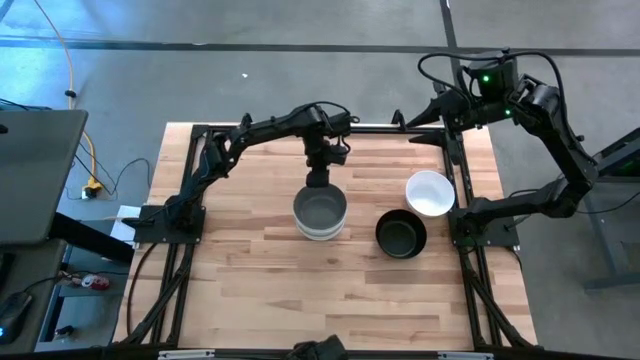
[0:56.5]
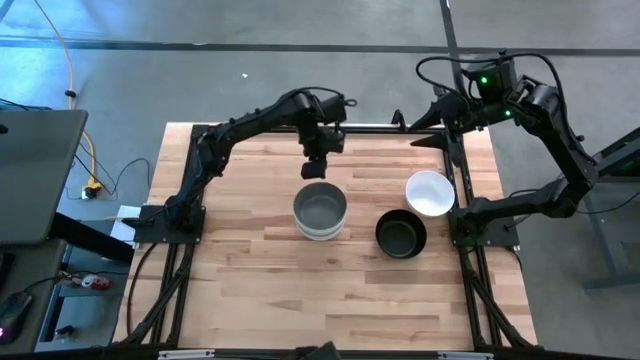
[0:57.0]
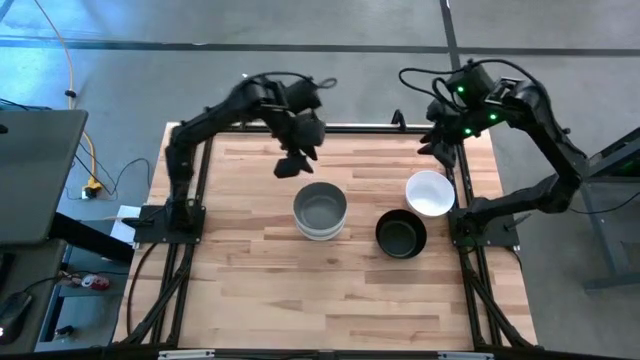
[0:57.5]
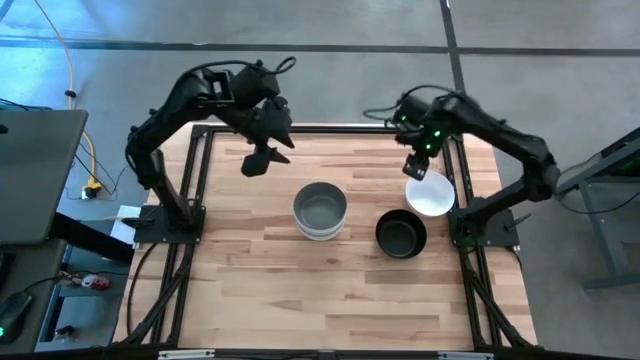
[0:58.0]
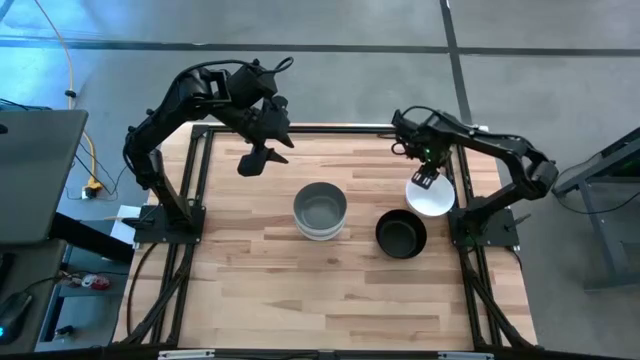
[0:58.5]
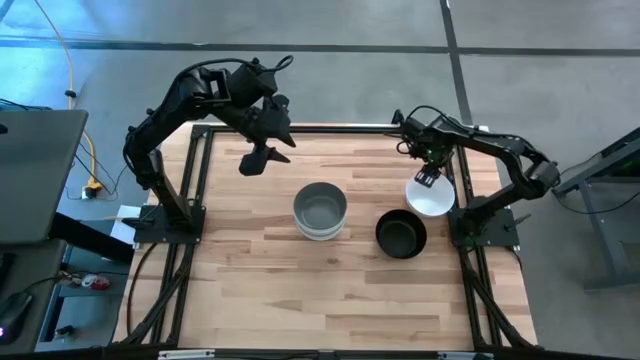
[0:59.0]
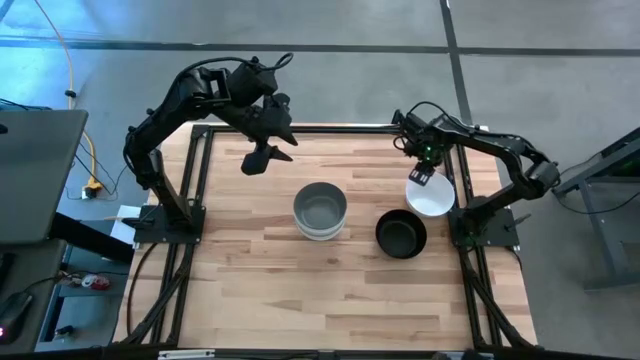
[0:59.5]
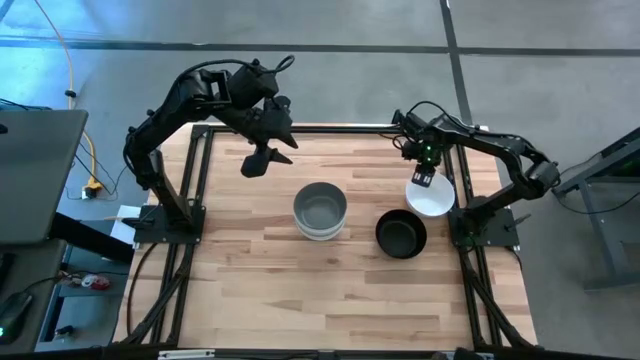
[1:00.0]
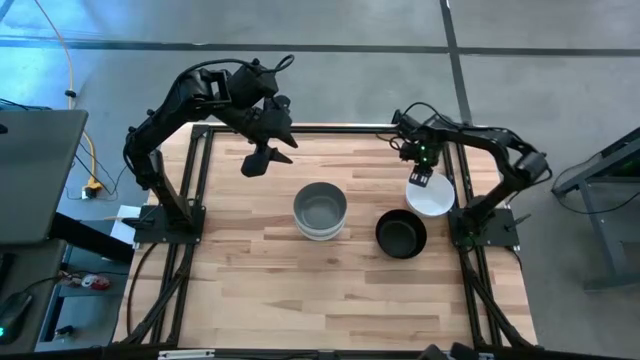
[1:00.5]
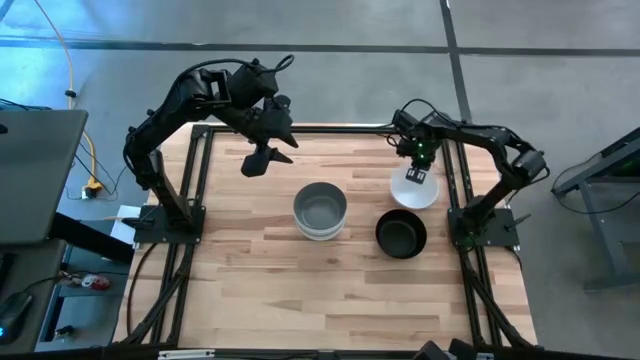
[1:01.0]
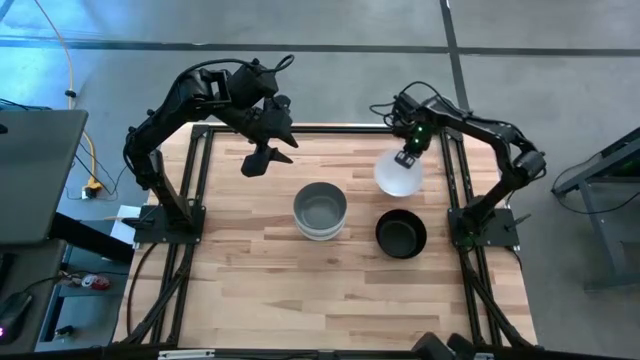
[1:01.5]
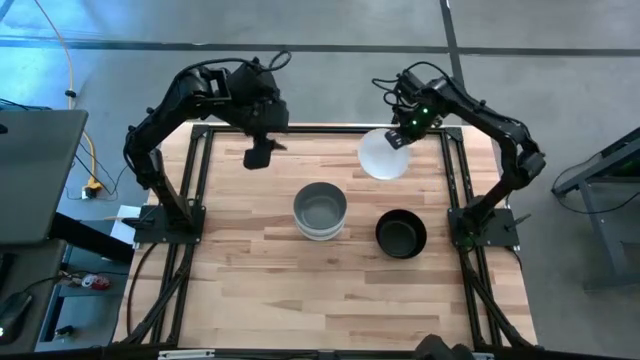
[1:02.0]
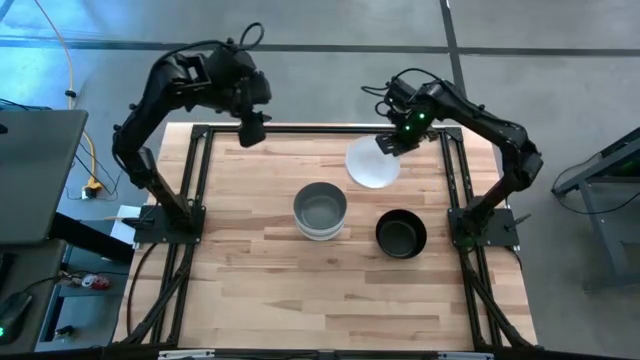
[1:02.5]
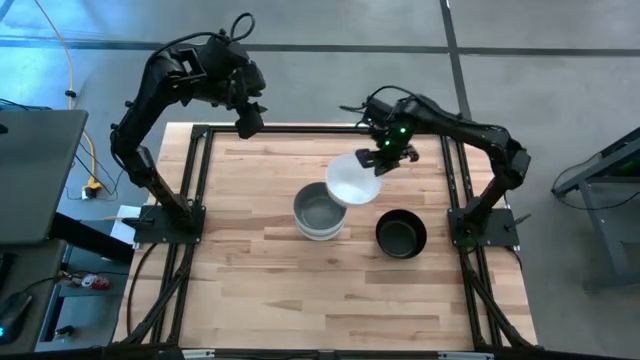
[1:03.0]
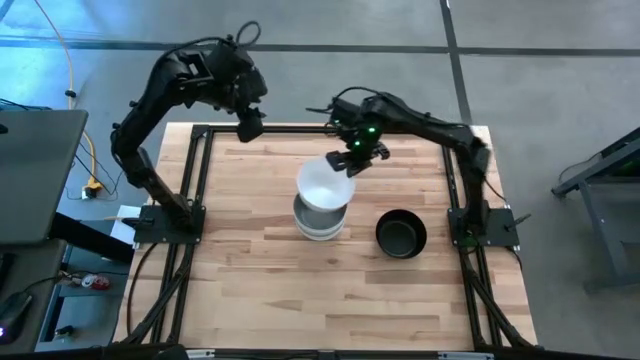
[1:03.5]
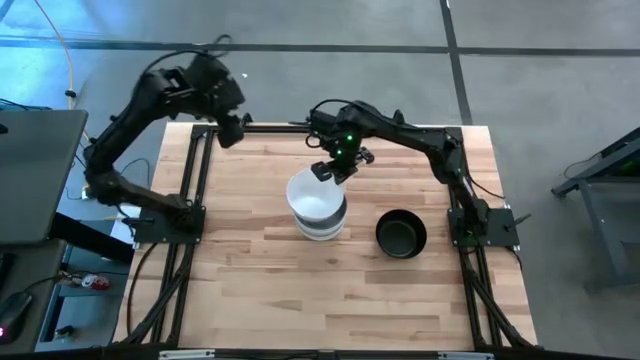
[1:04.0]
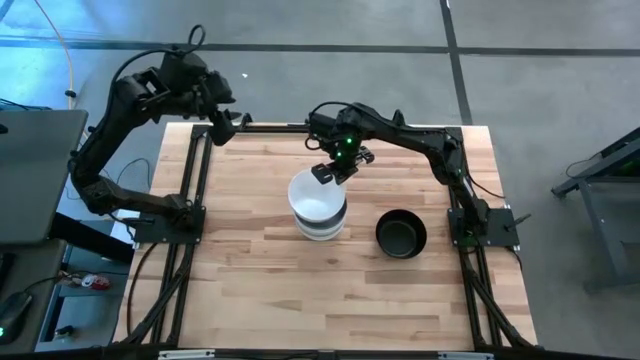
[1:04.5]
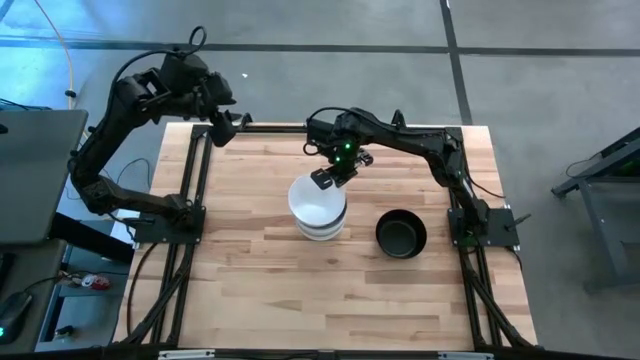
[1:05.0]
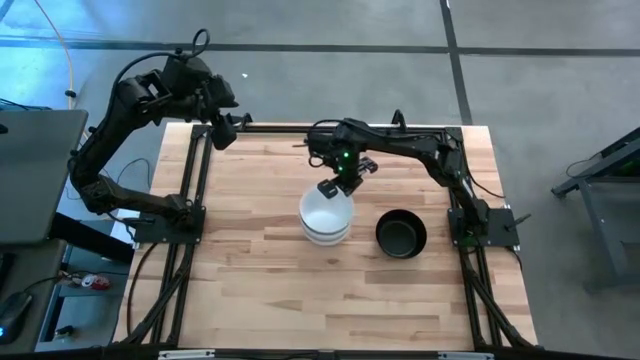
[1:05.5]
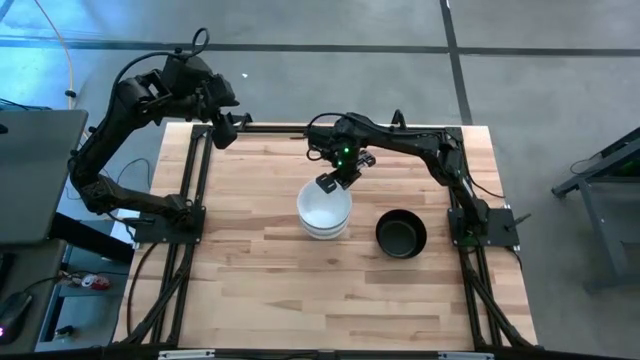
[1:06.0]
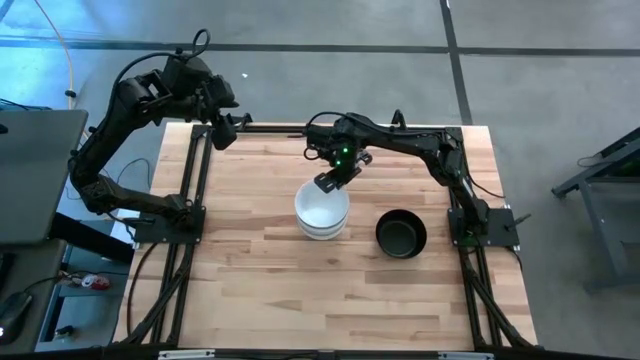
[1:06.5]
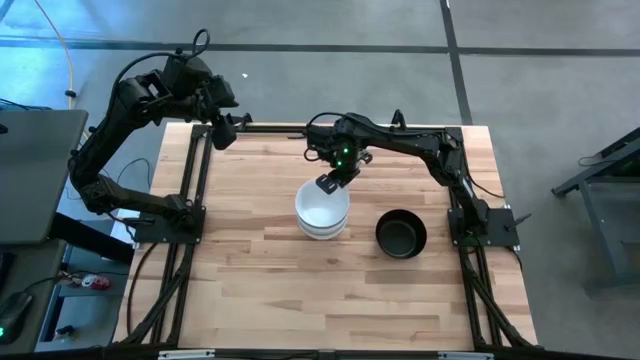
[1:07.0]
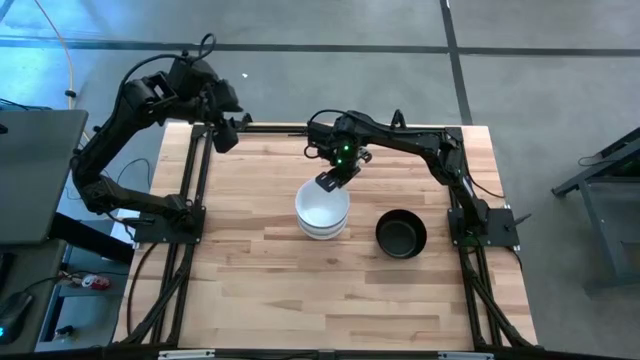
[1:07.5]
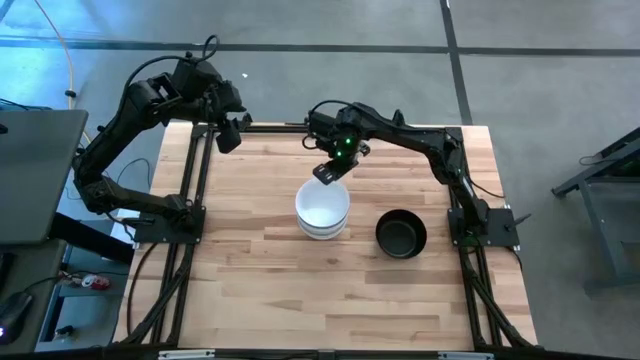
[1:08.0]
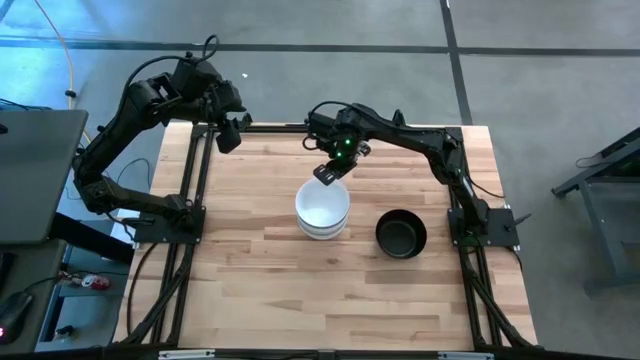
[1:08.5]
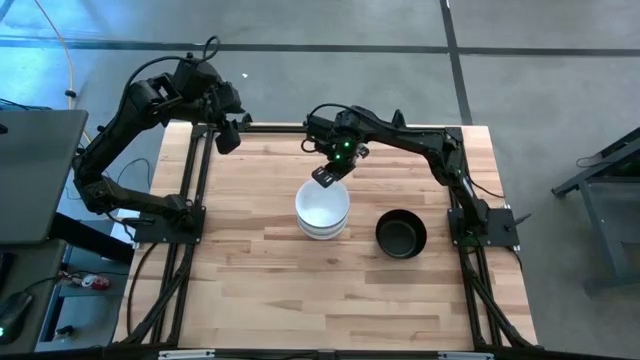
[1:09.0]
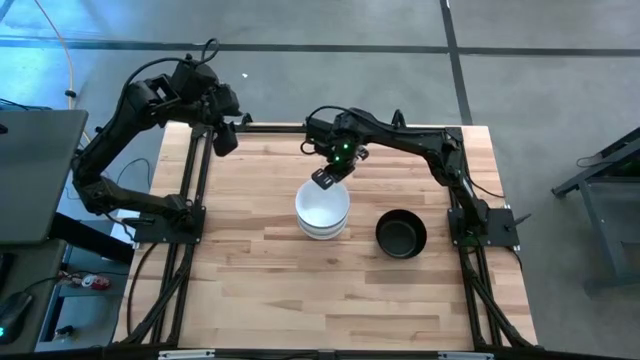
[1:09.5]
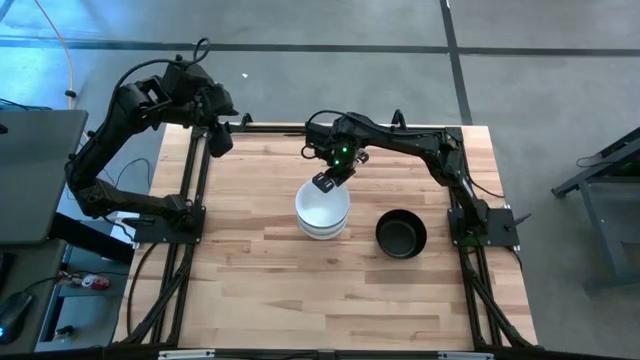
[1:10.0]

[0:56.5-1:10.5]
Task: Nest bowls inside each other
Stack the white bowl on top of the dark gray bowl

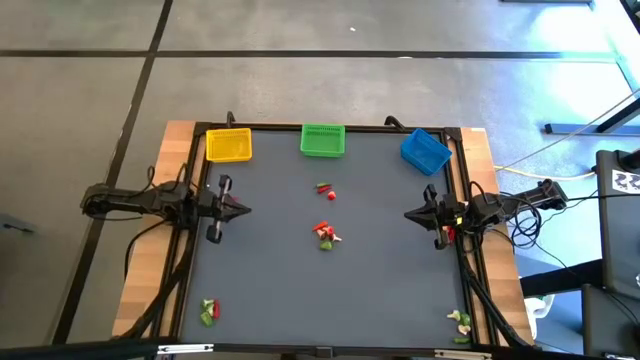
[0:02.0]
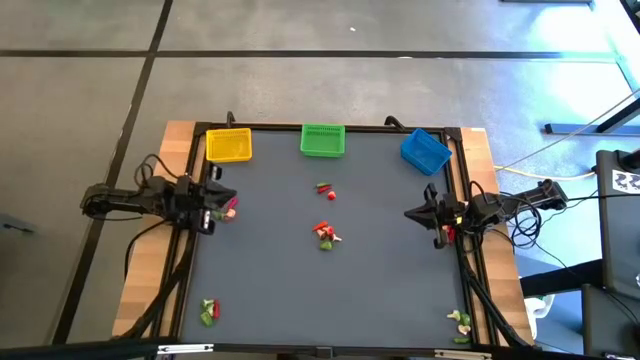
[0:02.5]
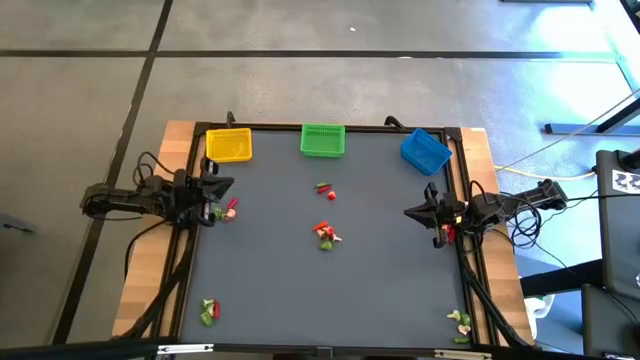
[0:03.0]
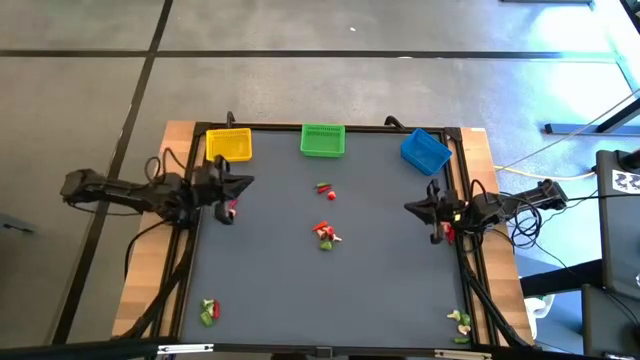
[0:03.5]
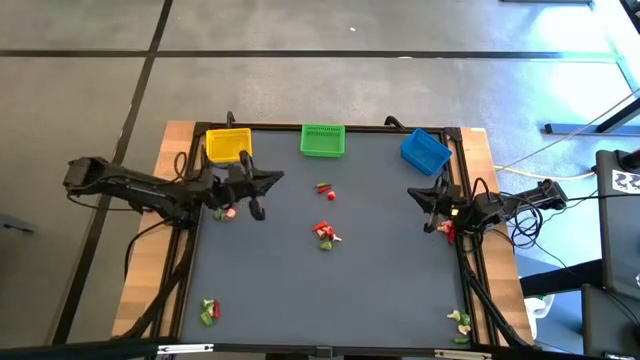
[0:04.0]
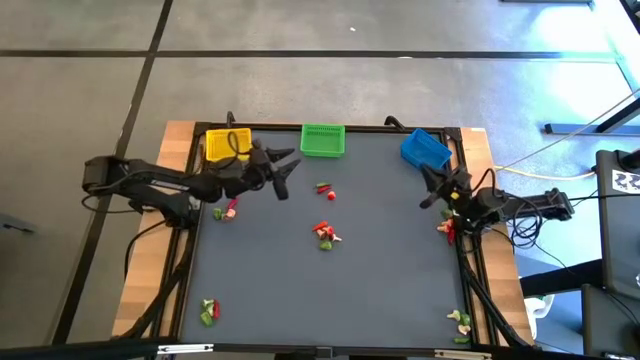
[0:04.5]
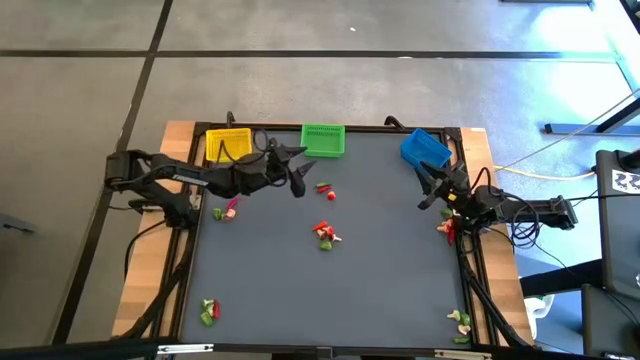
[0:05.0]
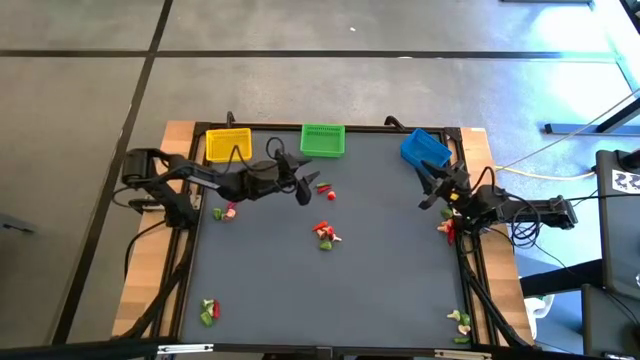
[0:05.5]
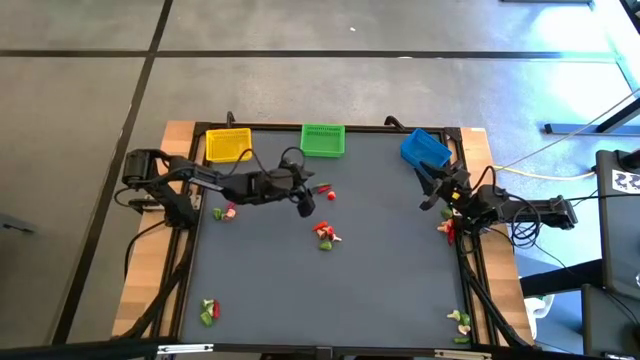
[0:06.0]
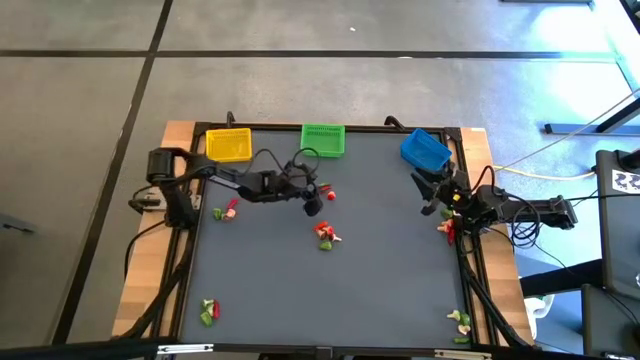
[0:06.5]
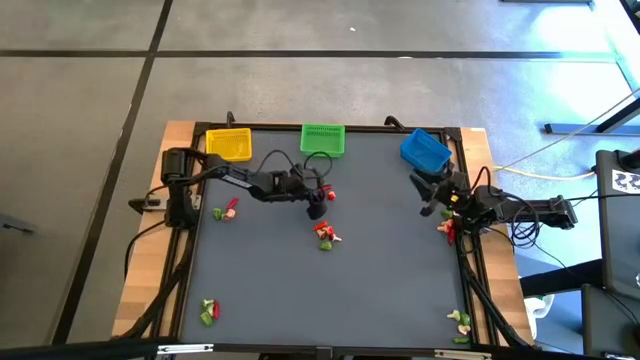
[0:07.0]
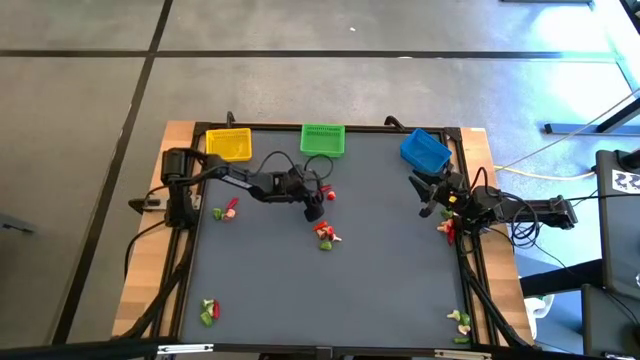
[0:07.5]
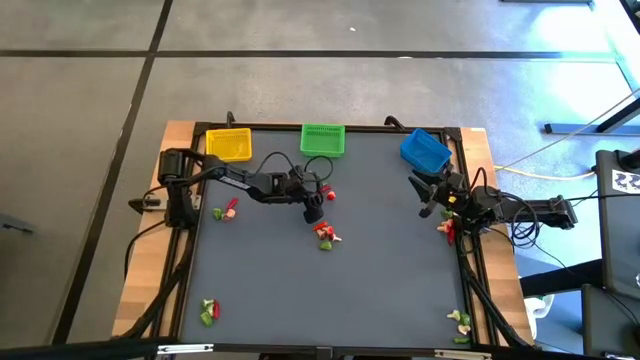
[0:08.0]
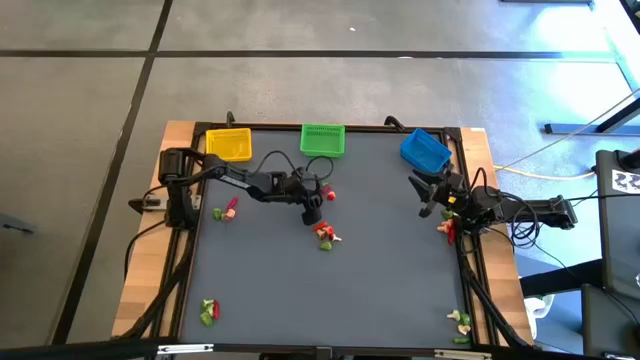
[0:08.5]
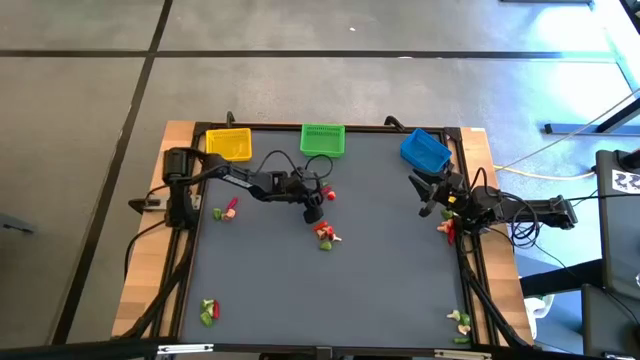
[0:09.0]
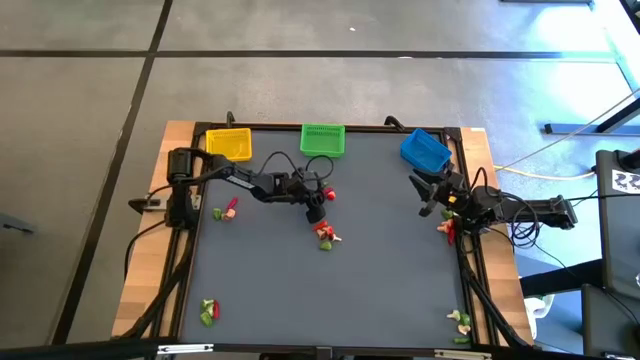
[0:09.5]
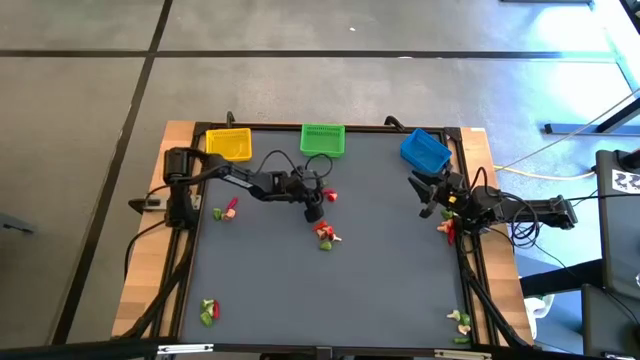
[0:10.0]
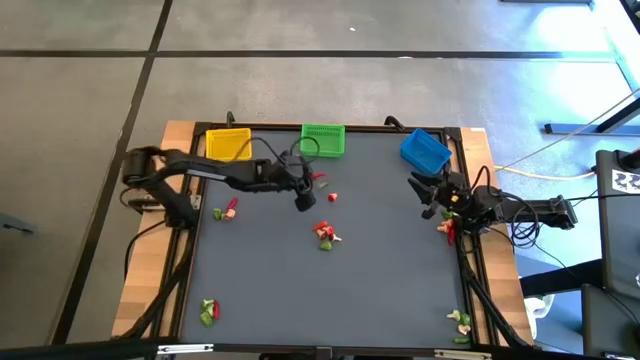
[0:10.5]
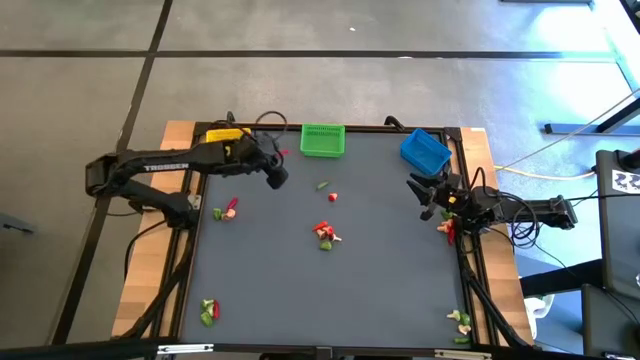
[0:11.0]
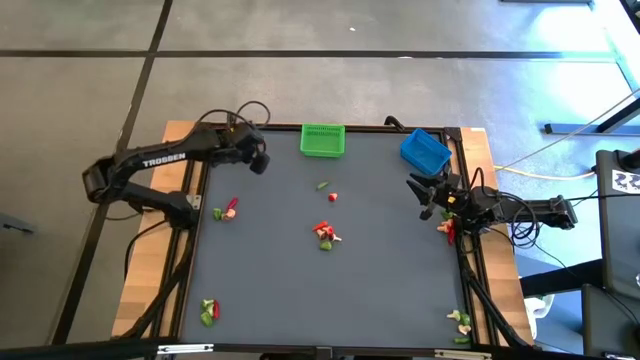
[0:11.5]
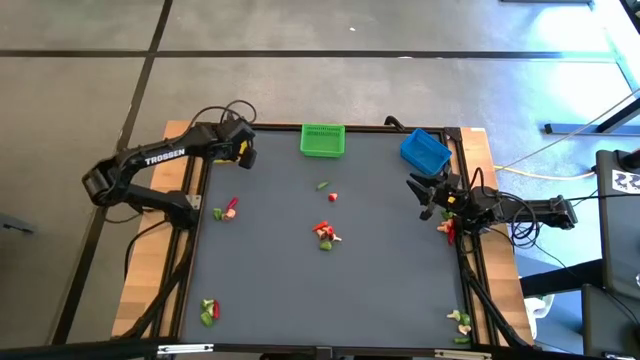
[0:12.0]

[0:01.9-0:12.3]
Task: Sort produce into baskets
Put the red chili pepper into the yellow basket
